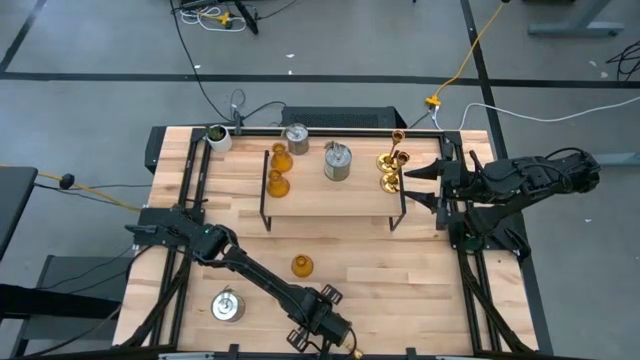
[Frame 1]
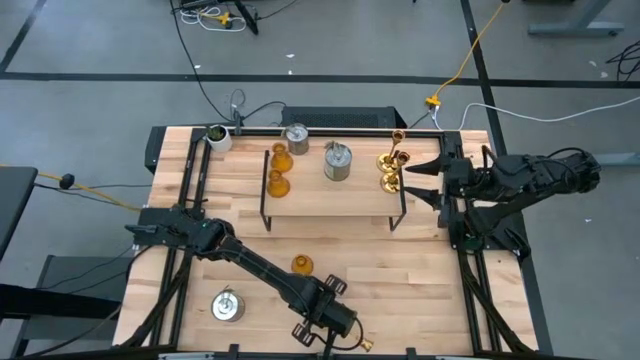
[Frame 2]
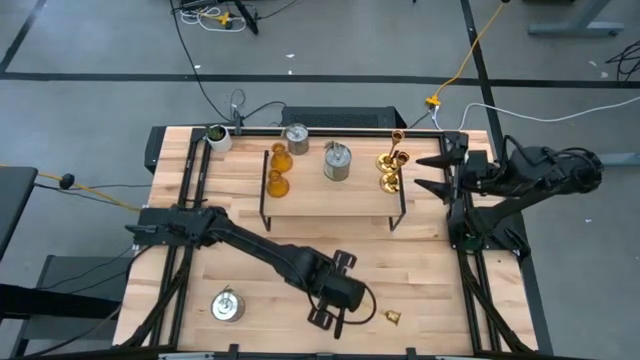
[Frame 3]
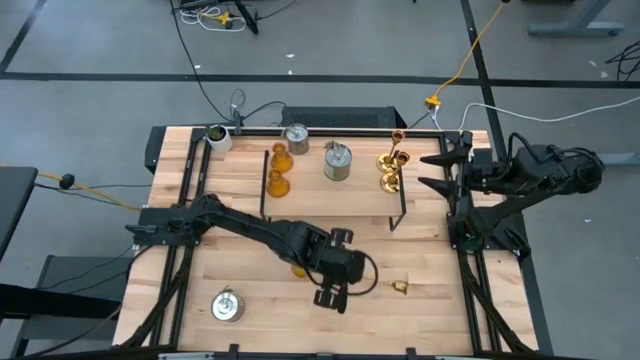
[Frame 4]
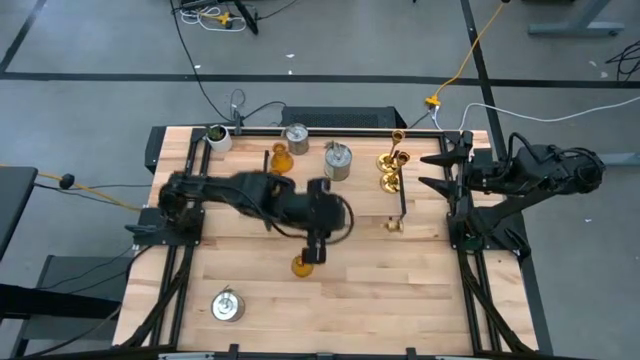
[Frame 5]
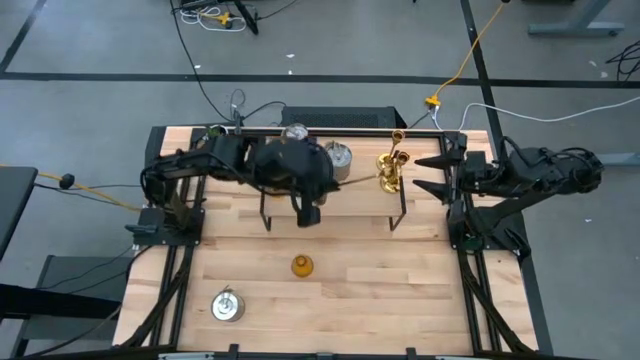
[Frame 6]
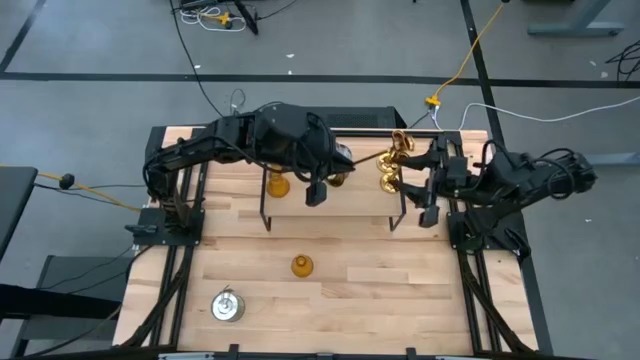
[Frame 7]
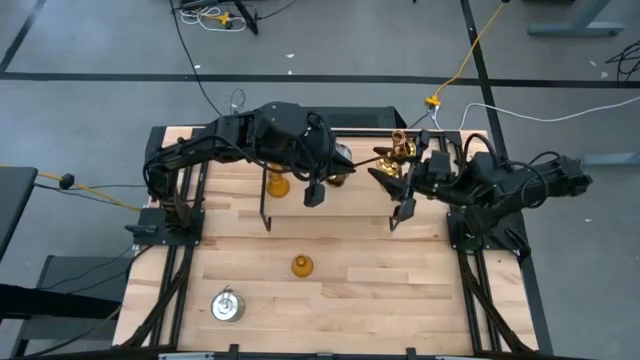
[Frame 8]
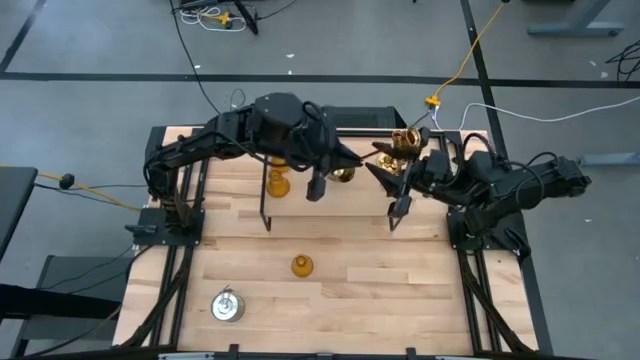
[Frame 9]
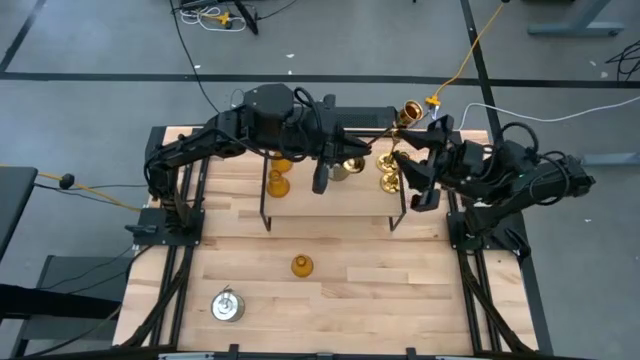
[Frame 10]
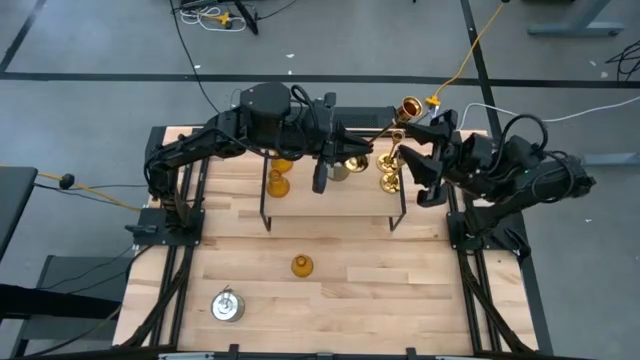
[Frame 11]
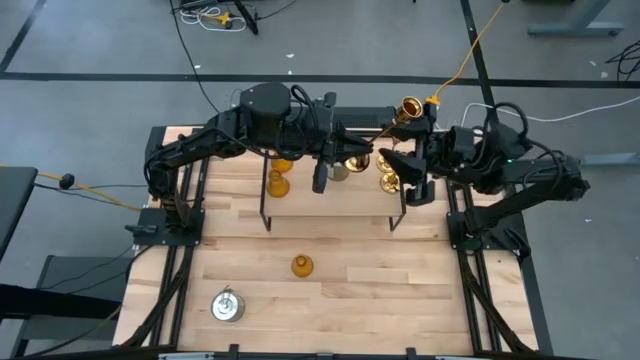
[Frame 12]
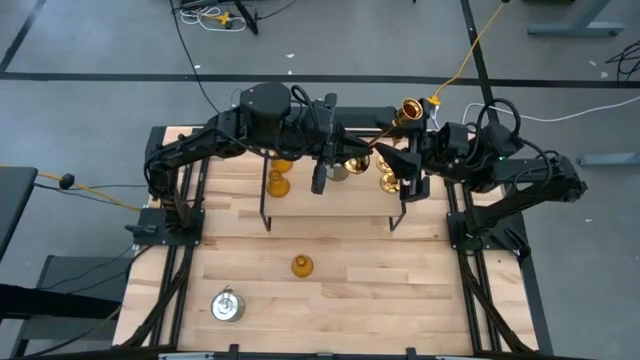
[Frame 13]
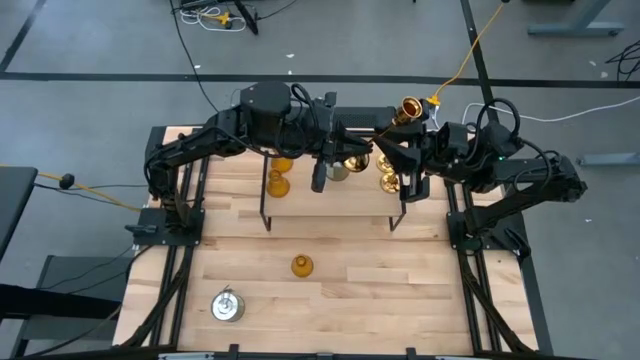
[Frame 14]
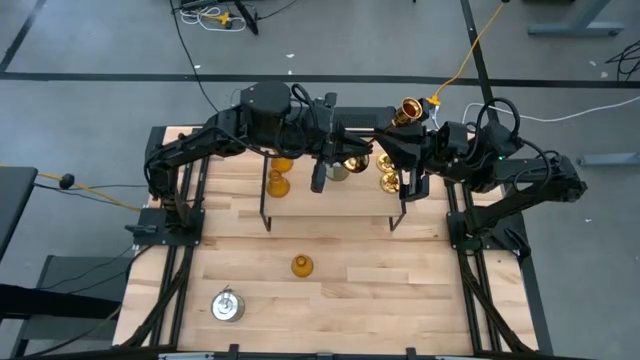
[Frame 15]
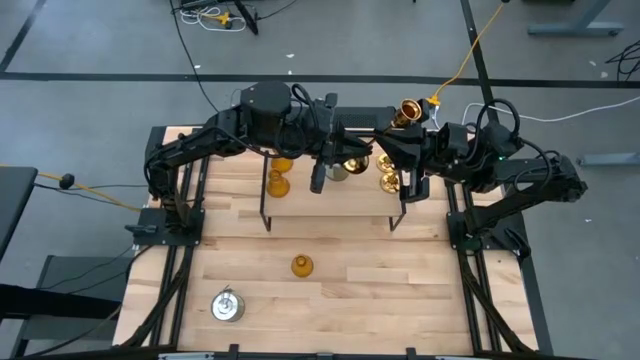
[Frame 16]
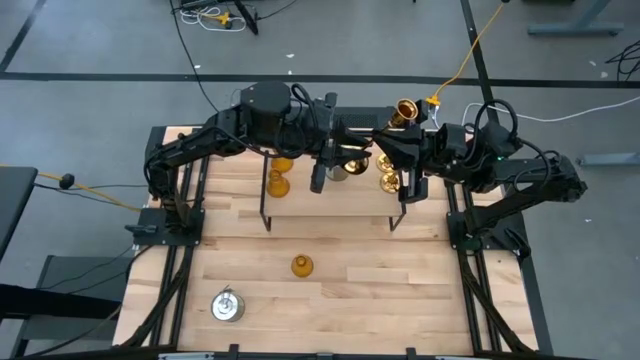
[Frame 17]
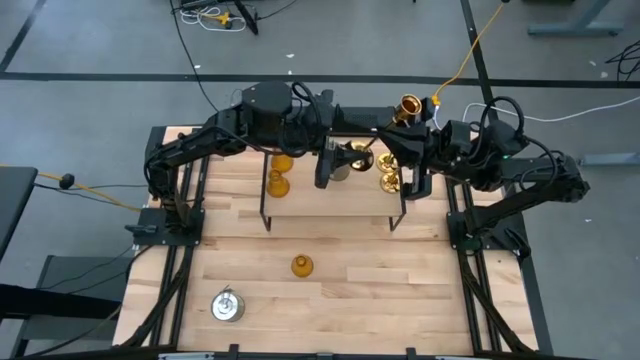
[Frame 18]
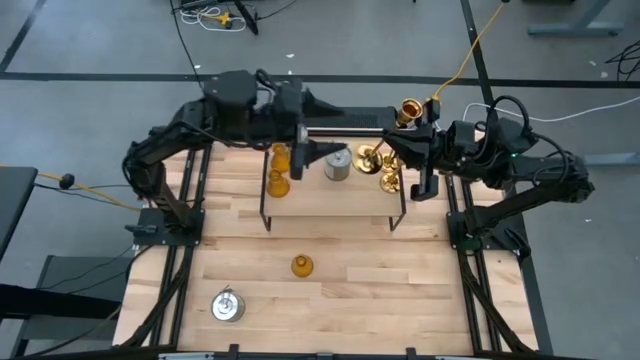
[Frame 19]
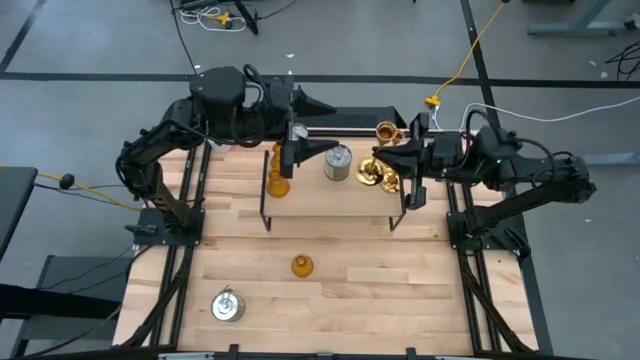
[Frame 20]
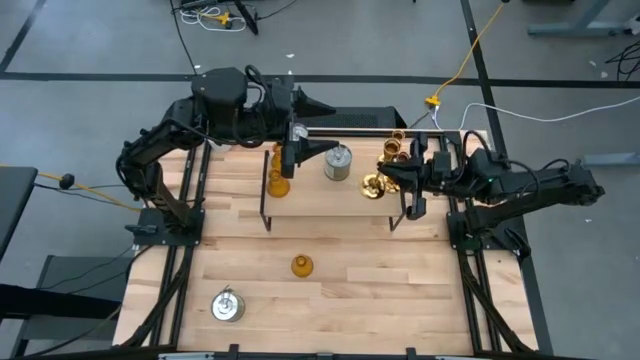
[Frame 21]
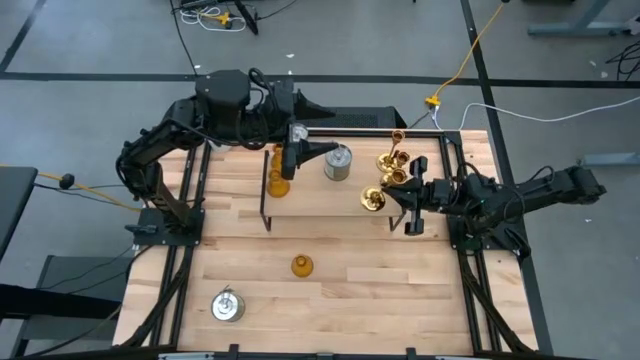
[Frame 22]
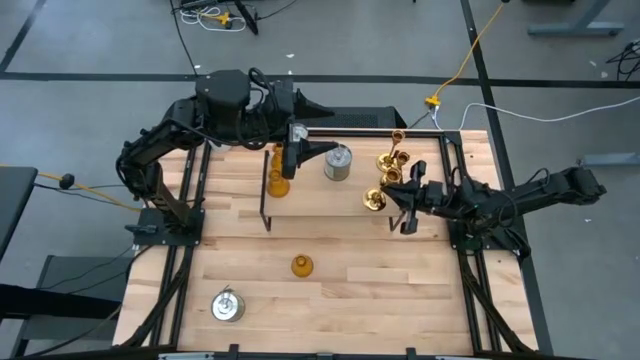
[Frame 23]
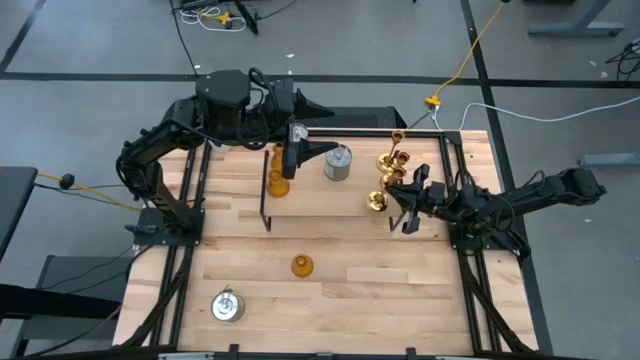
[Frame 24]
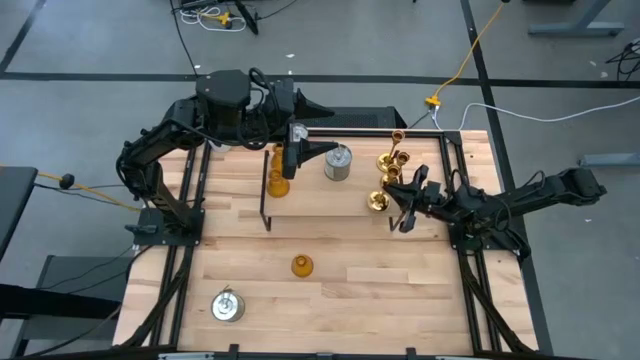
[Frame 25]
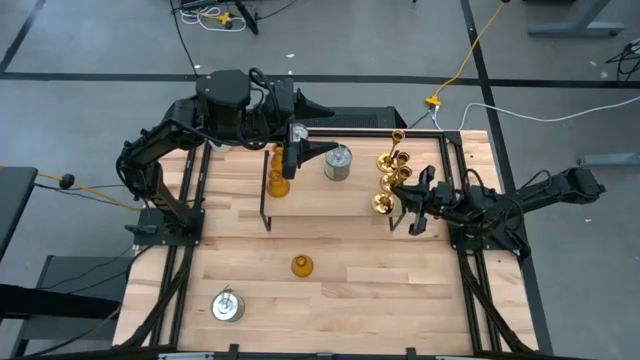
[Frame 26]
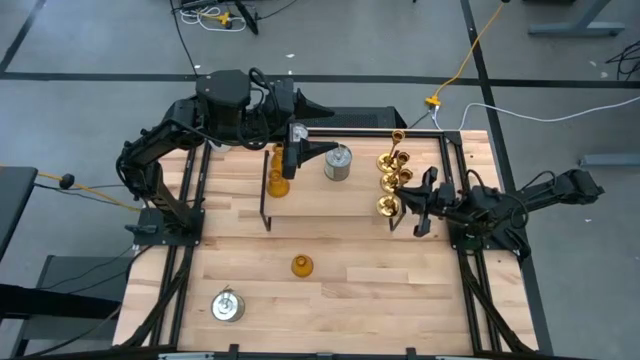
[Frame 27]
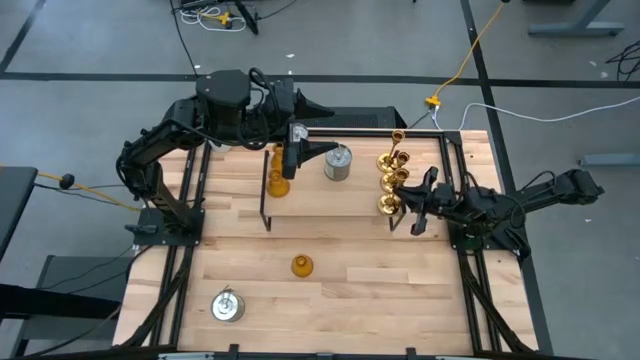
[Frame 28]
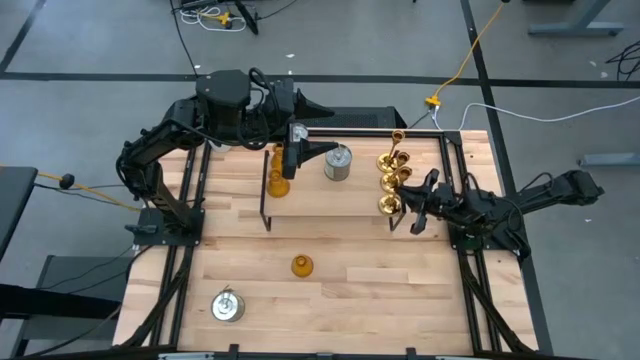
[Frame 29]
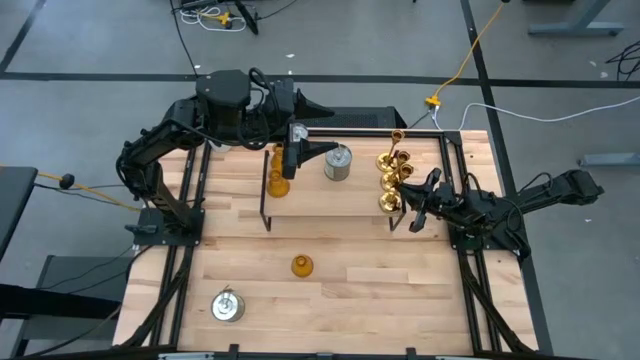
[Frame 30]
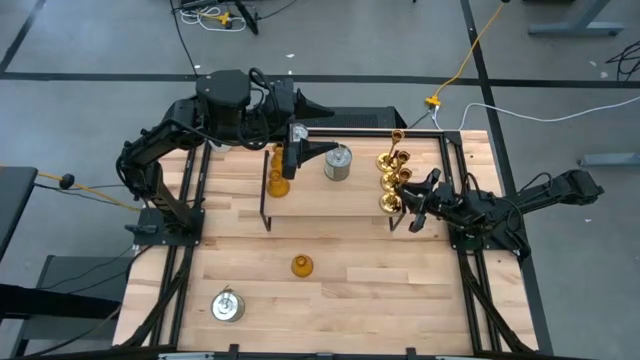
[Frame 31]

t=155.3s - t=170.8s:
Task: Pick & Place candle stick holders
Put the candle holder on the shelf aligned with the other candle holder

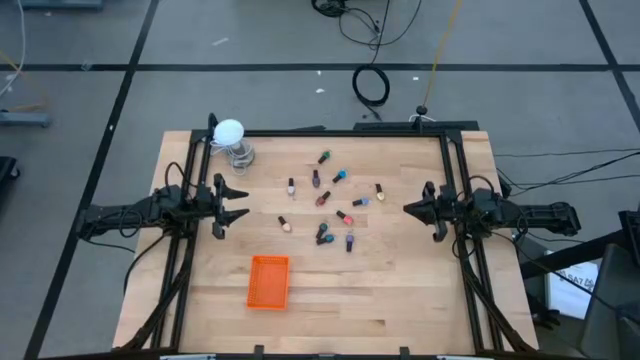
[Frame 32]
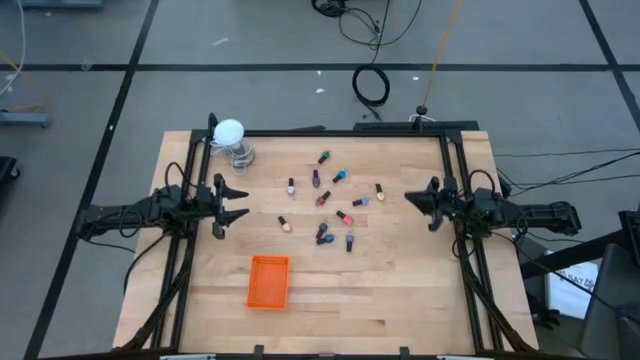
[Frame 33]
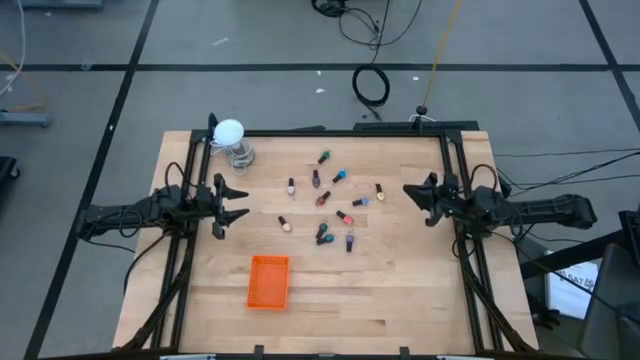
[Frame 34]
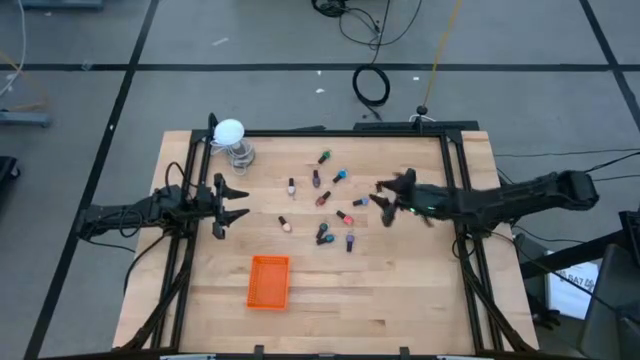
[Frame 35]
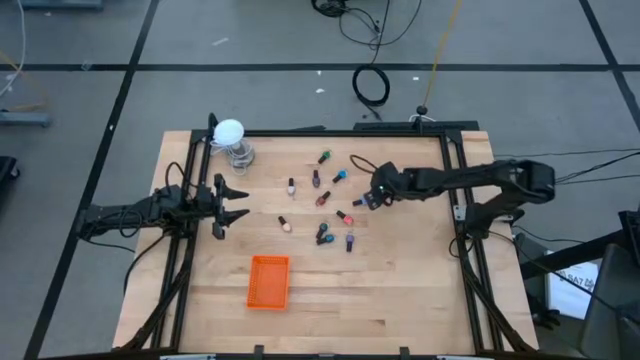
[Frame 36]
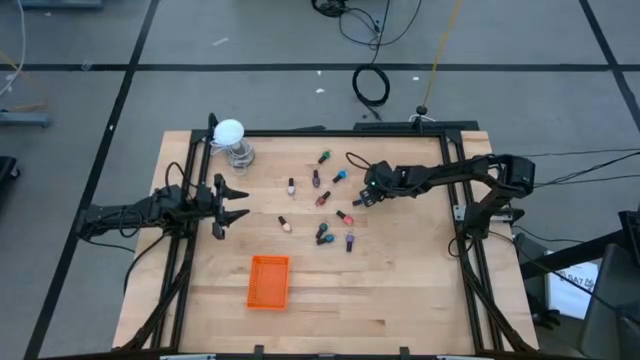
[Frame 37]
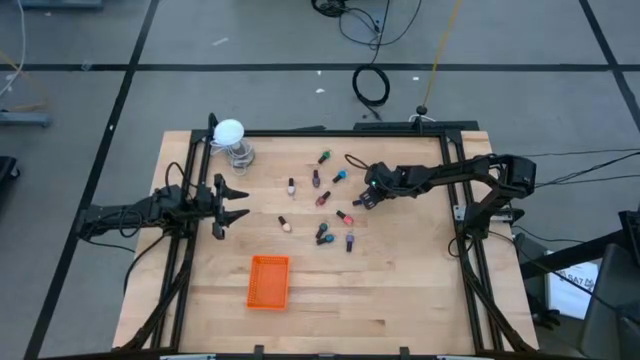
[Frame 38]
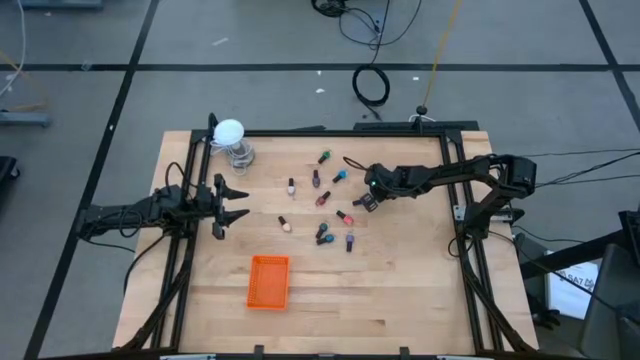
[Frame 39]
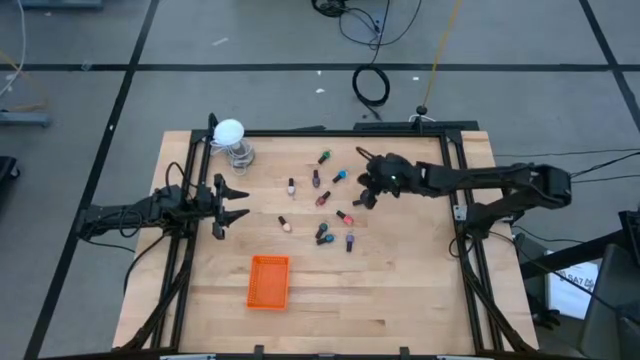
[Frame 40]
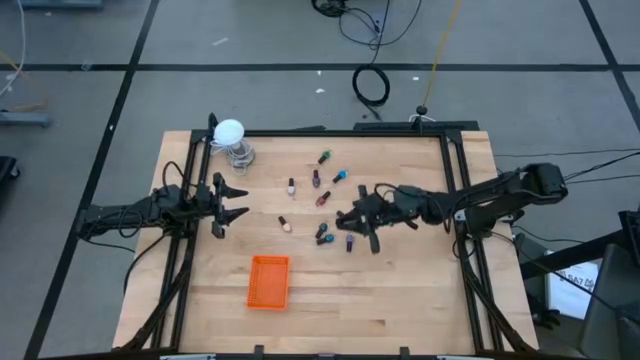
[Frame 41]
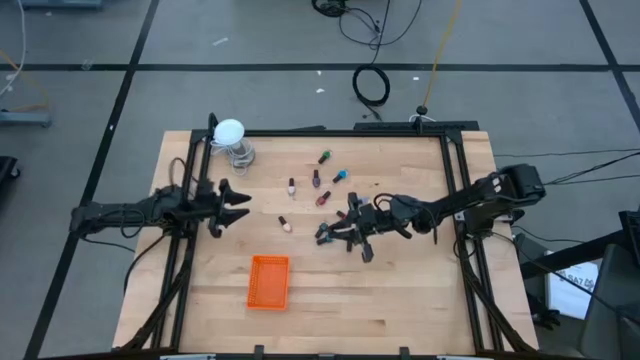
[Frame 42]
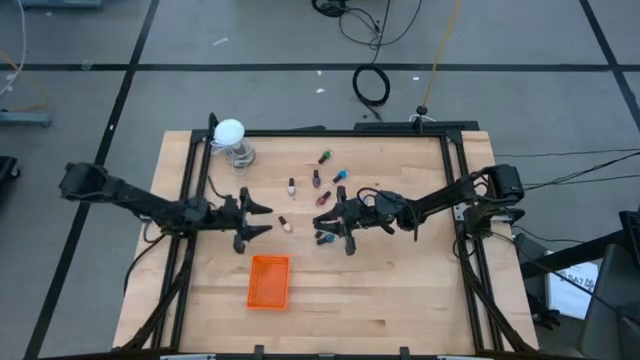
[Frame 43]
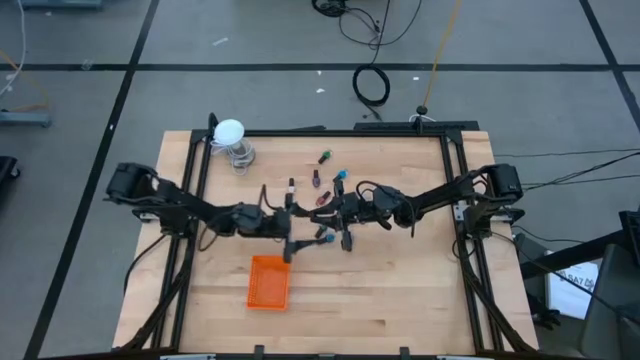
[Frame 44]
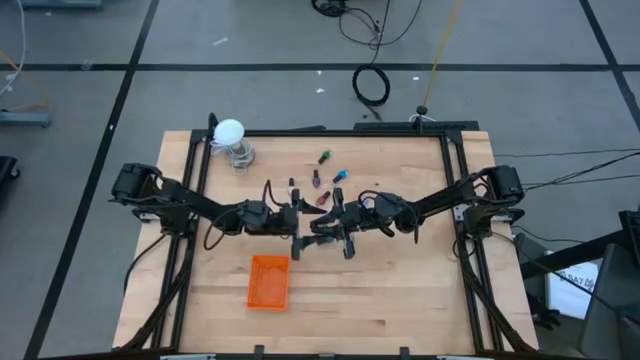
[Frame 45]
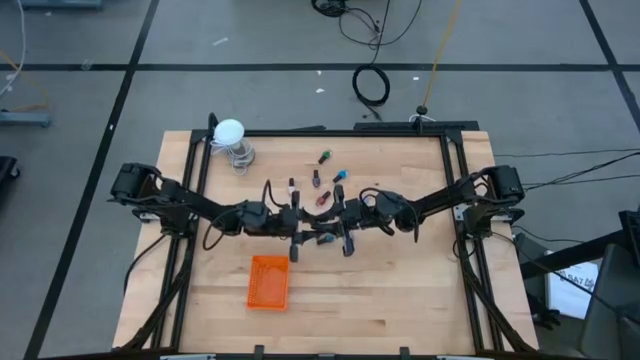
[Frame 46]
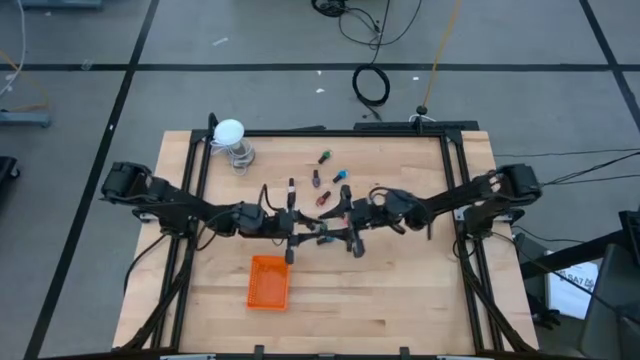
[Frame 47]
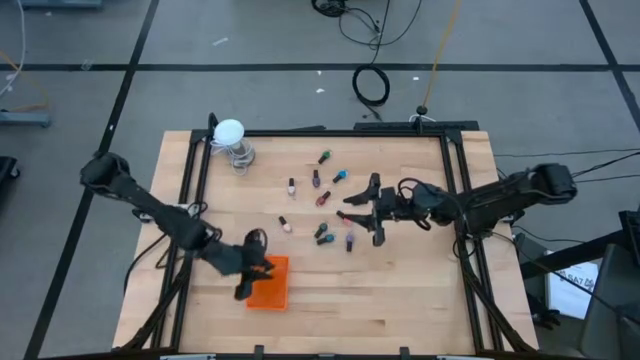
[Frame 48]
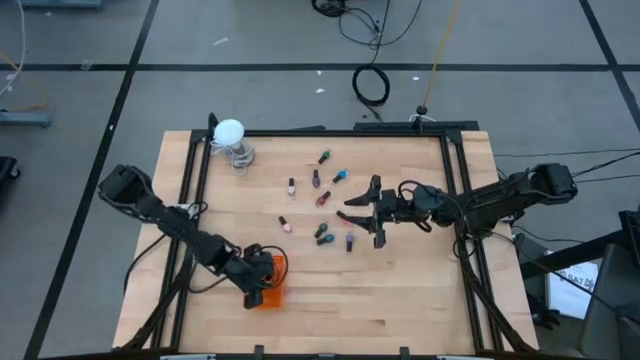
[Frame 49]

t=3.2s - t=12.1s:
Task: Pick & Place Nail Polish
Put the yellow nail color bottle into the orange bin
